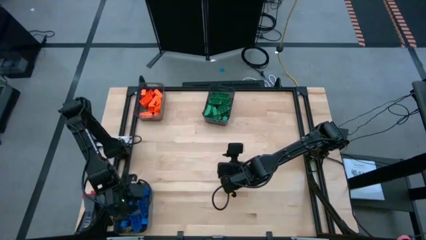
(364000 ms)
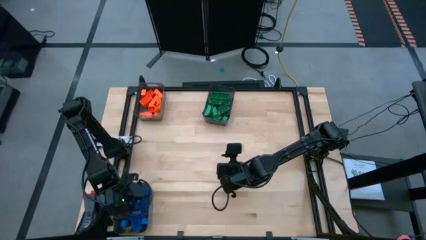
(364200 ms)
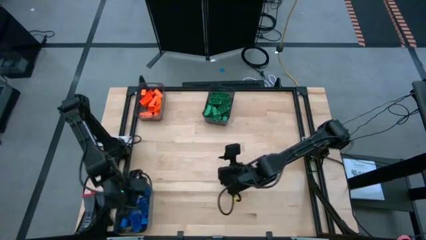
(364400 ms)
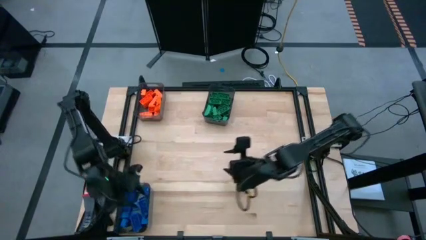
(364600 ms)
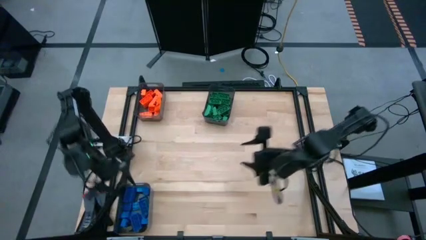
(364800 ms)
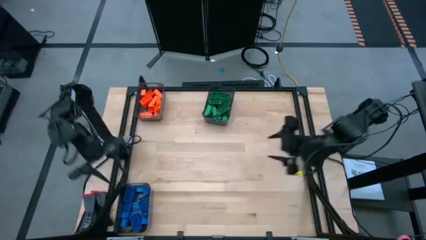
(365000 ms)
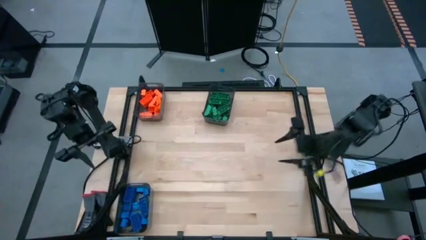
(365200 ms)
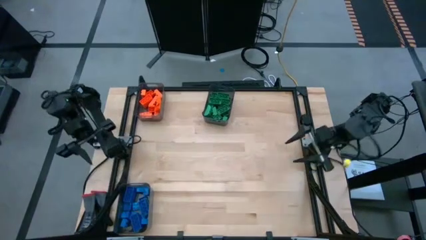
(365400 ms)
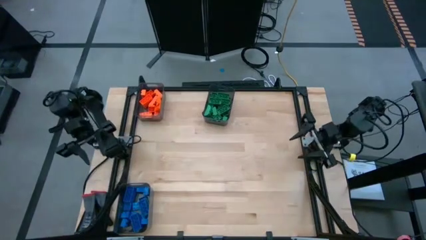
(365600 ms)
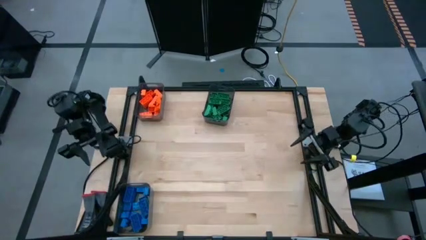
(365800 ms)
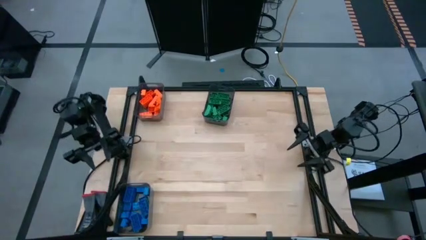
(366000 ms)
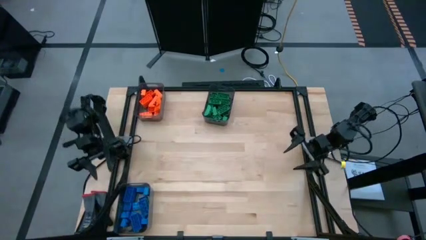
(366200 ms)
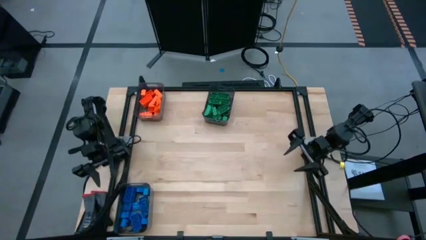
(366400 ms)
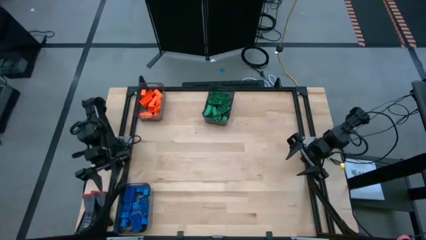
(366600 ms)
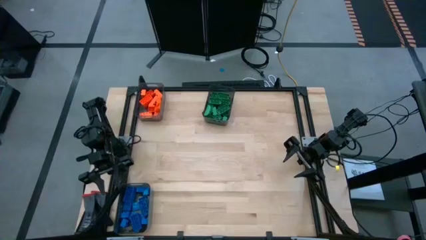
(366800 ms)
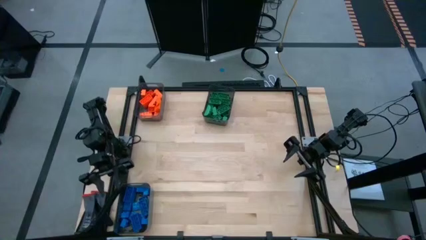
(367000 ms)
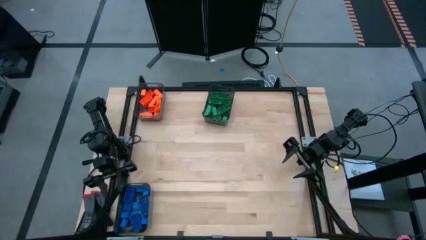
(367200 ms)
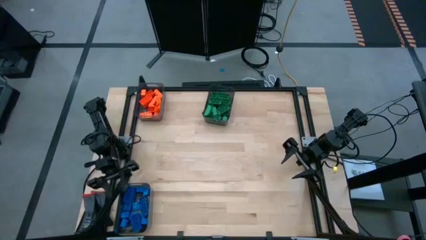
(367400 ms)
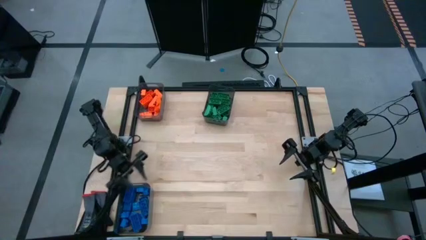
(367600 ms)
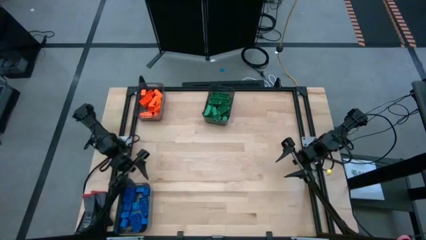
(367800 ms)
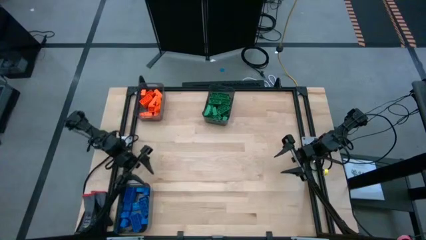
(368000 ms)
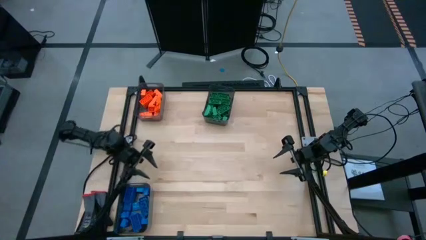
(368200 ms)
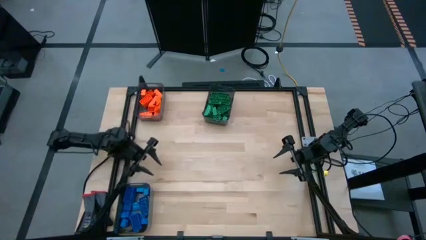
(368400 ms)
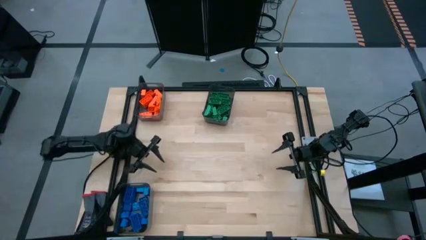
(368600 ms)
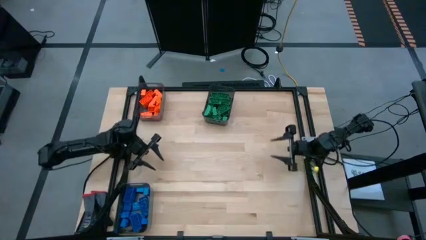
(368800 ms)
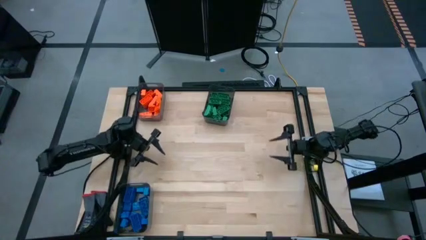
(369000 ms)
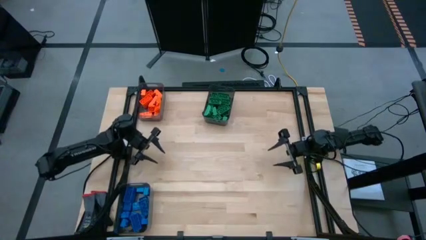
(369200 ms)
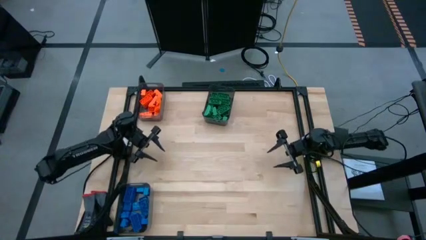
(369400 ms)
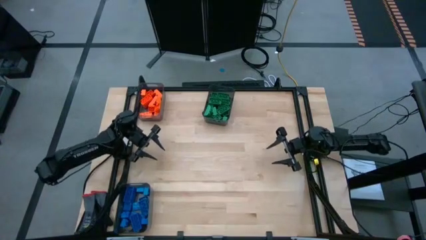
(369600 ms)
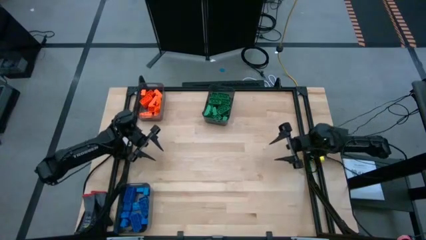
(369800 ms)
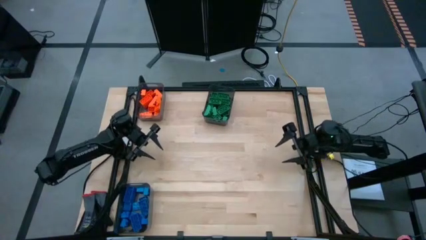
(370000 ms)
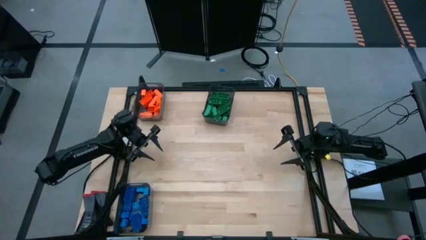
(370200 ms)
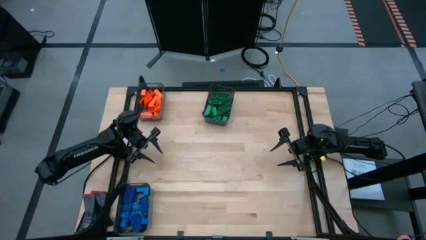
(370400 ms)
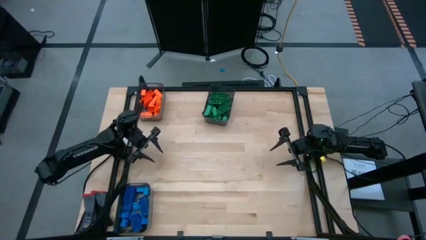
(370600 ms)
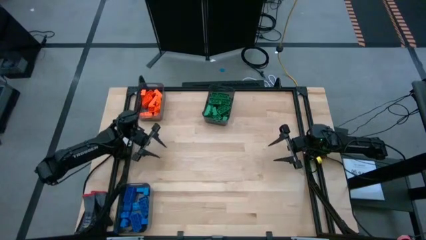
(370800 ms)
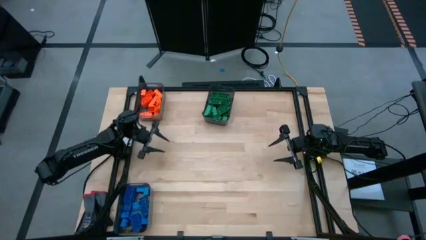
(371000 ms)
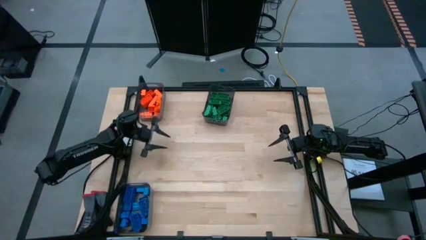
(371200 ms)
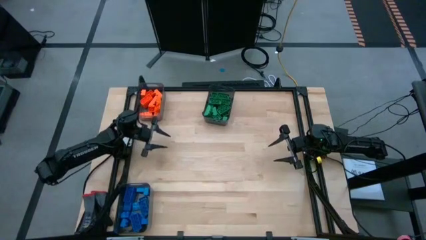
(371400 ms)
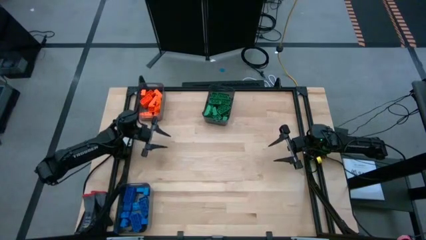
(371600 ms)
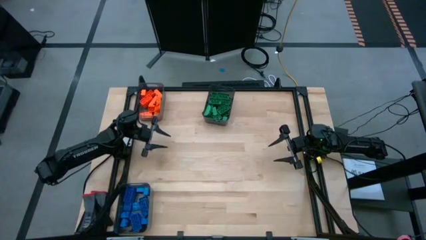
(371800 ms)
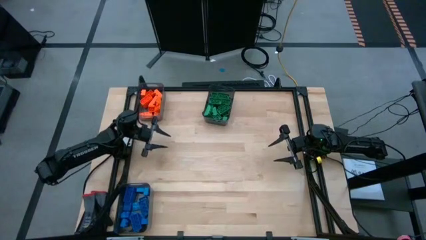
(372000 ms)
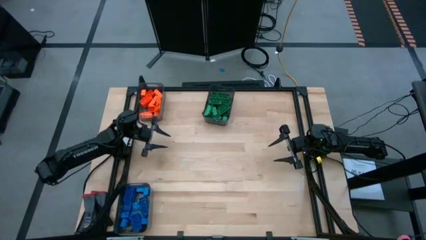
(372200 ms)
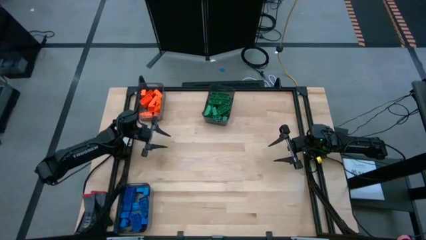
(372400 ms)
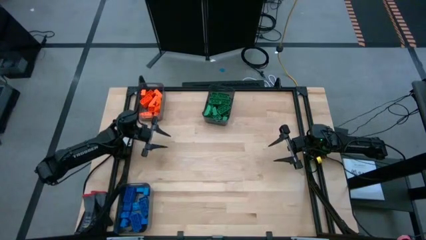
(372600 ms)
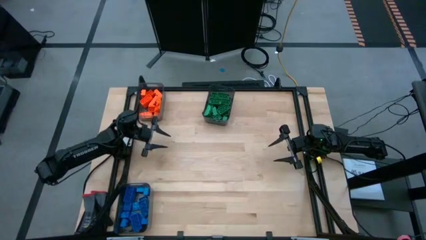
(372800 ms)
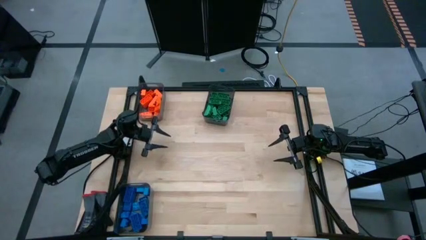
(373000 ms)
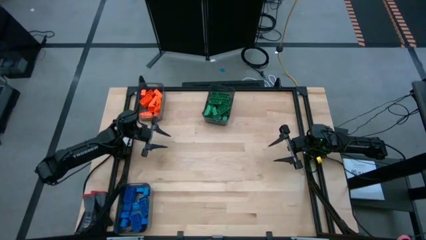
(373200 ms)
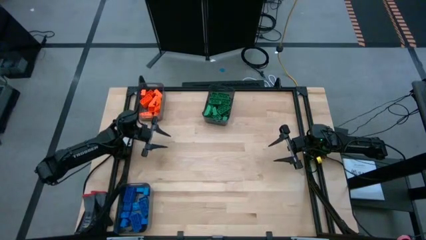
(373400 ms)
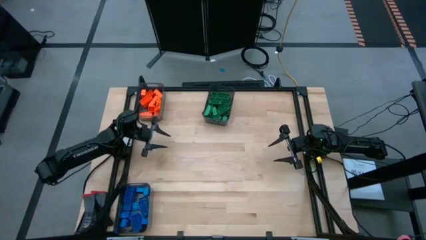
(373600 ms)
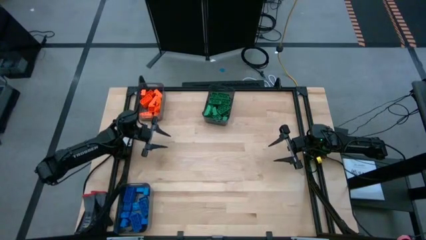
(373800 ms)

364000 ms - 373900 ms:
Task: Sort blocks
Return to Home Position

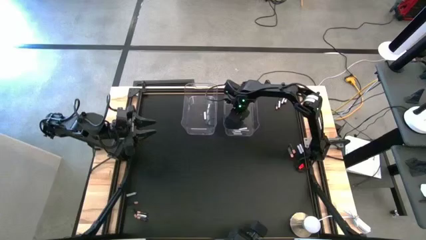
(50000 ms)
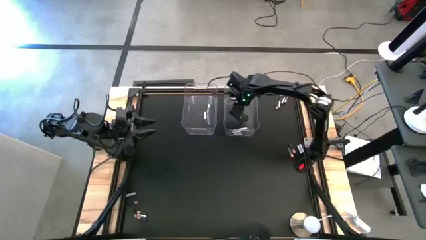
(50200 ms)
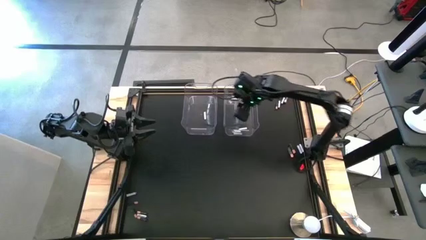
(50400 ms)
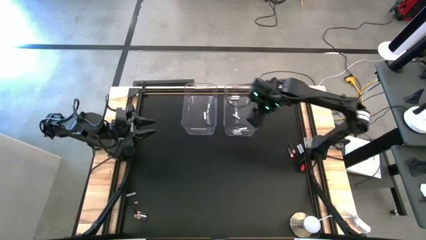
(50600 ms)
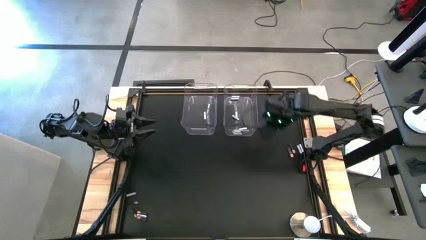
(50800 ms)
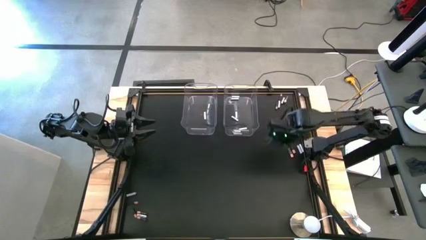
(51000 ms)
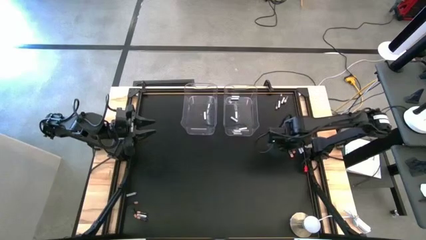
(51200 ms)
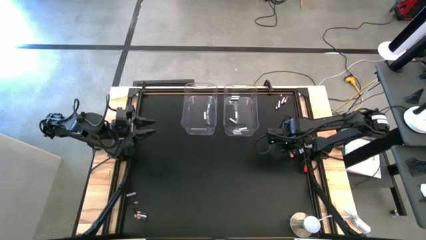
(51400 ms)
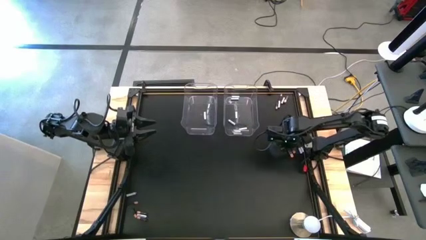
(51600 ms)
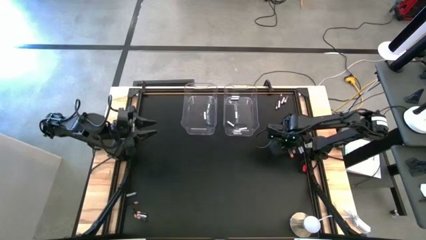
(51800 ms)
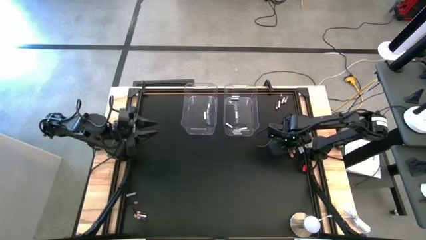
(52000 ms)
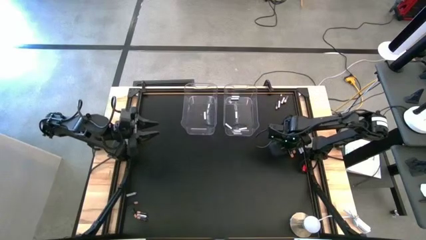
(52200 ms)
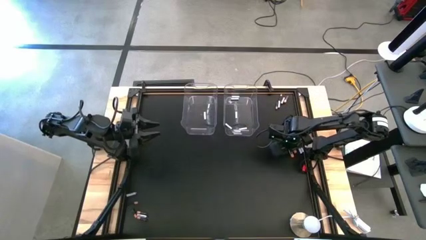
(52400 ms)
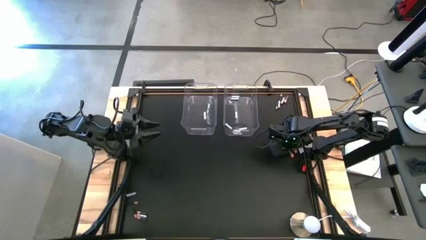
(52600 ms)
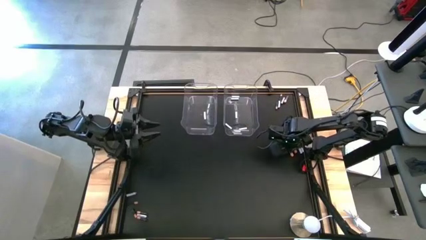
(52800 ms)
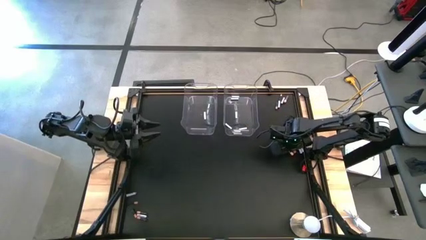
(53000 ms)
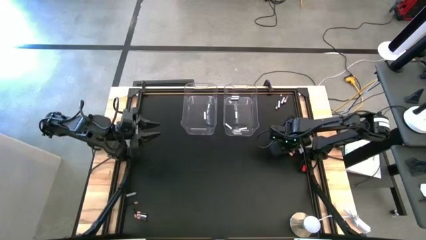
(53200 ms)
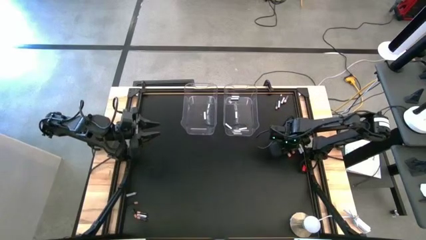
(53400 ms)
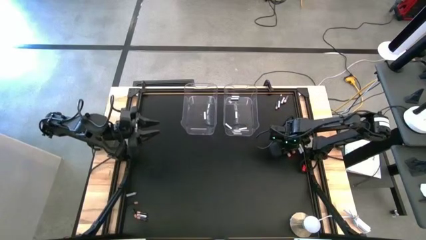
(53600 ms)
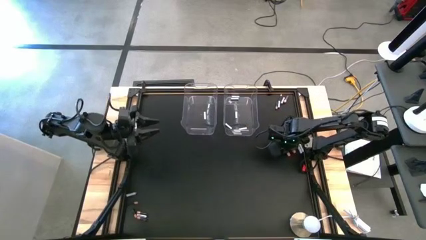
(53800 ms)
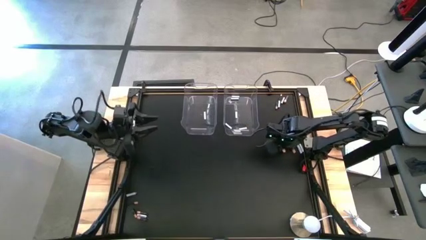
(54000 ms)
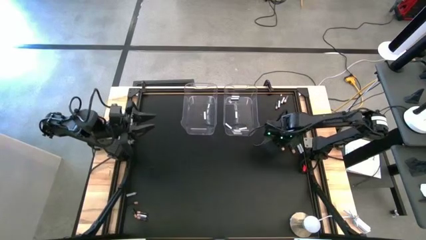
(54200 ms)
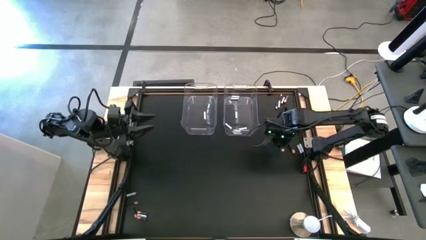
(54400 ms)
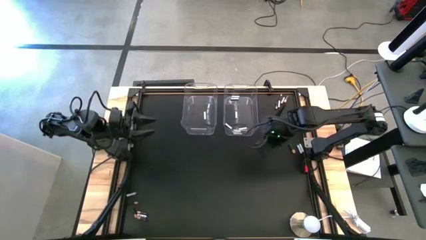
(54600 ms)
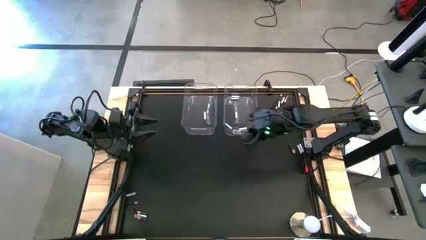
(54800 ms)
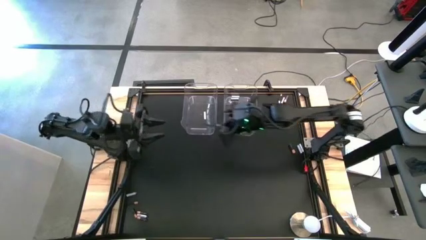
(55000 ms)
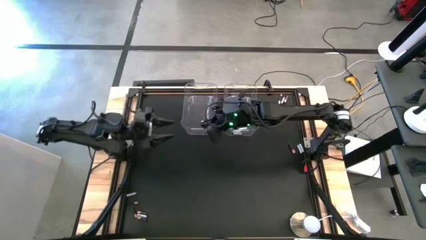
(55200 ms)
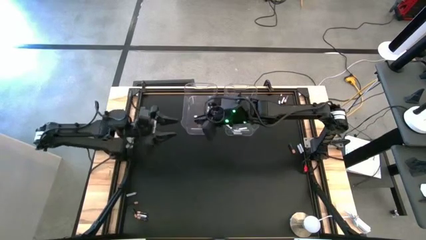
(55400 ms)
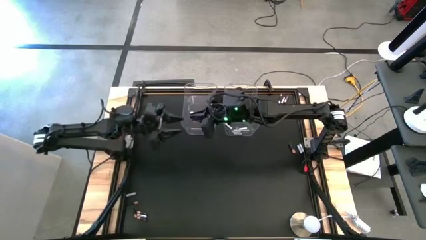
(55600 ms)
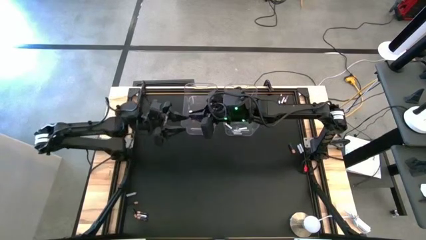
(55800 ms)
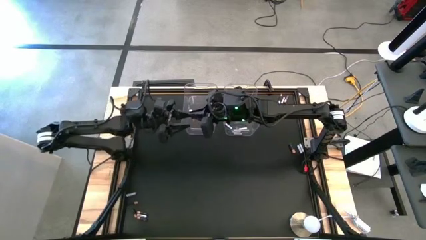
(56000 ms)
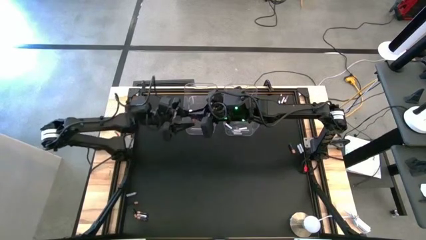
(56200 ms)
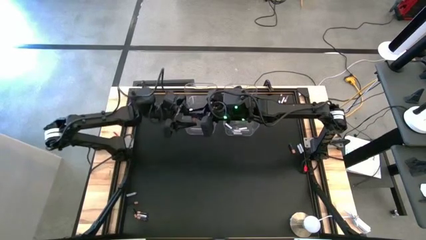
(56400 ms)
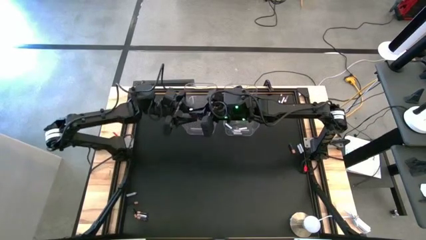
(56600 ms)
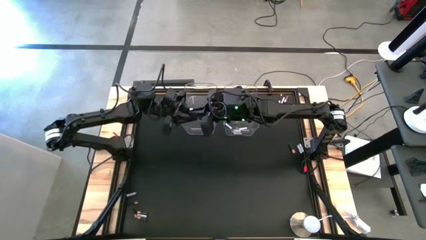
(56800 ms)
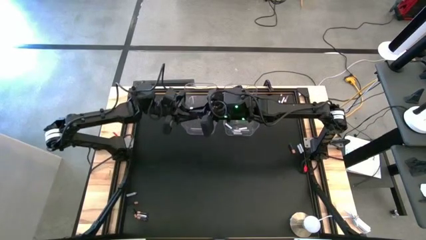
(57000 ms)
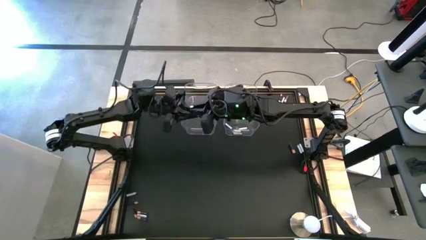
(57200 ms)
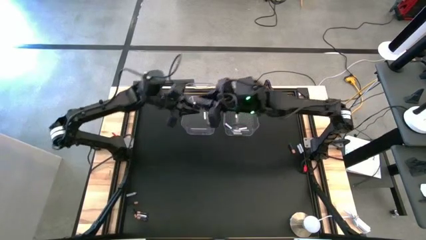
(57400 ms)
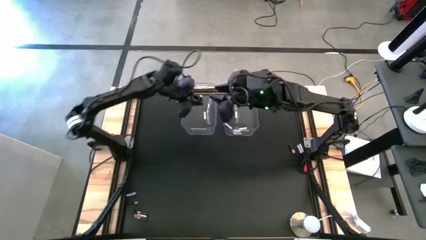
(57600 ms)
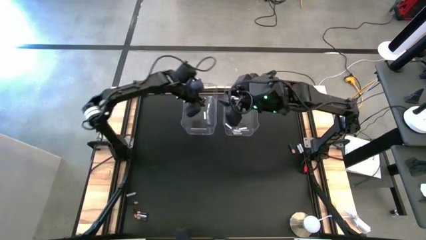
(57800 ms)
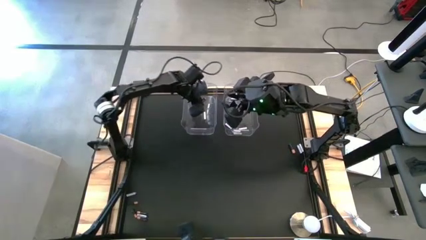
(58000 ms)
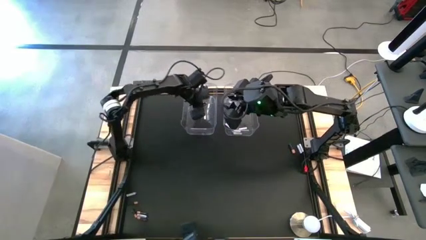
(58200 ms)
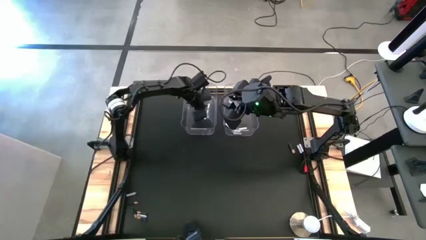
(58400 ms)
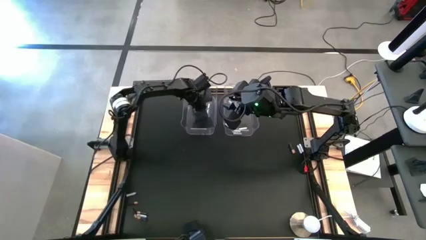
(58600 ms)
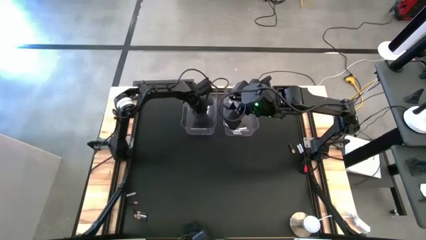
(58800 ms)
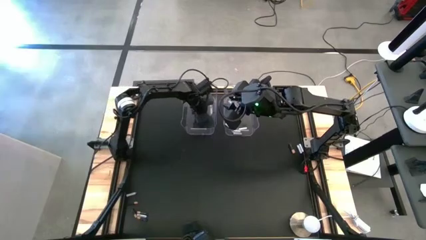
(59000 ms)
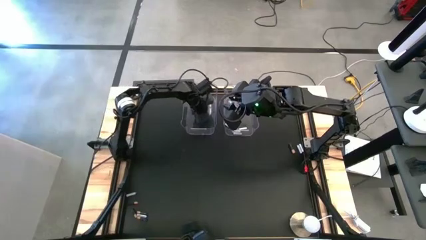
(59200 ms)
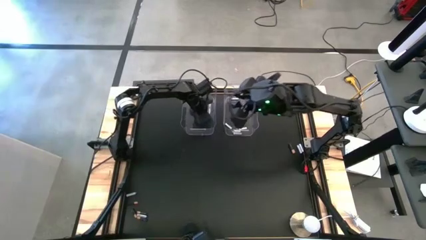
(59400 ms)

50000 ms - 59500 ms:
Task: Sort batteries
Put the black battery into the left transparent bin
